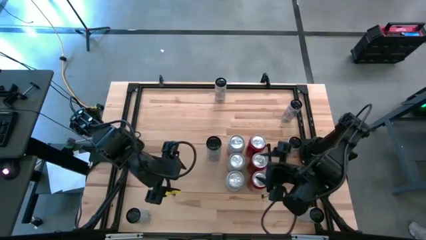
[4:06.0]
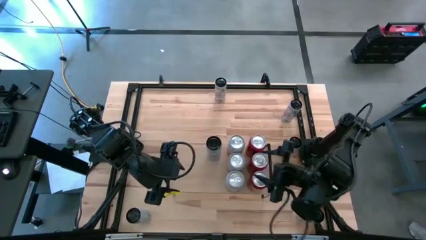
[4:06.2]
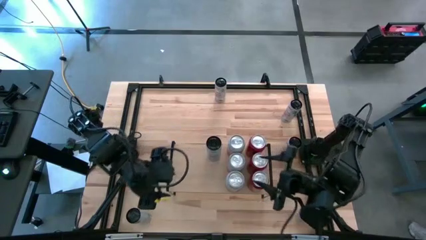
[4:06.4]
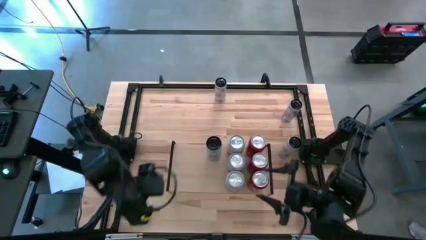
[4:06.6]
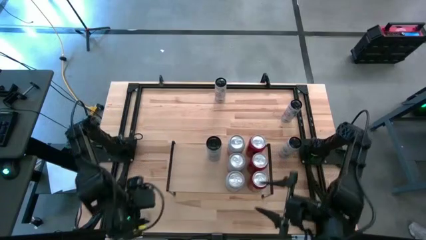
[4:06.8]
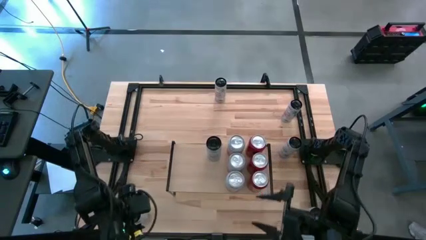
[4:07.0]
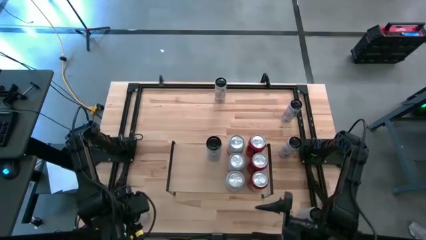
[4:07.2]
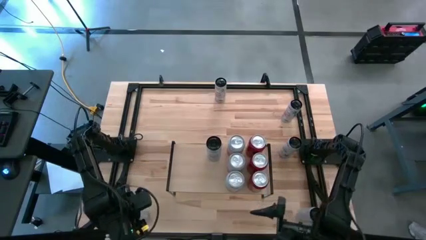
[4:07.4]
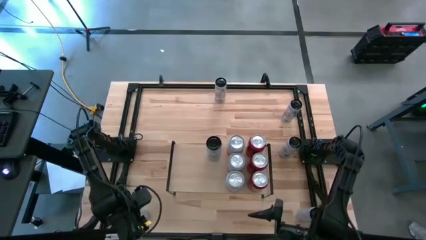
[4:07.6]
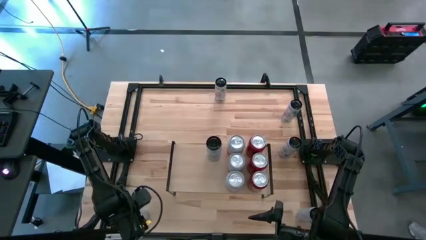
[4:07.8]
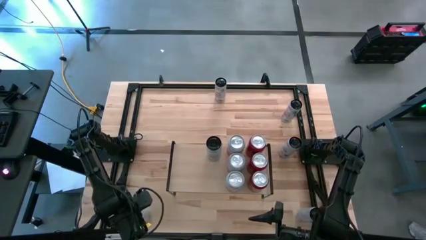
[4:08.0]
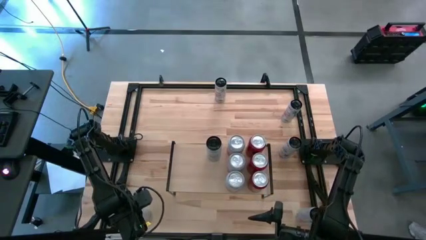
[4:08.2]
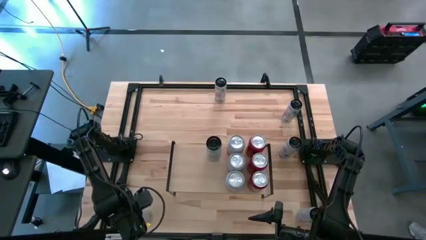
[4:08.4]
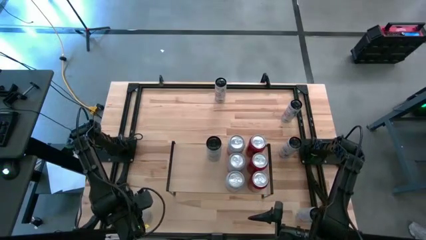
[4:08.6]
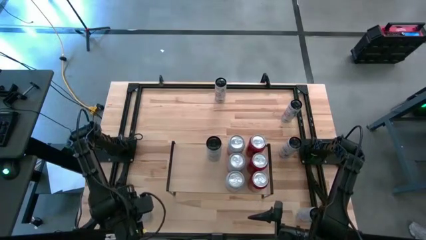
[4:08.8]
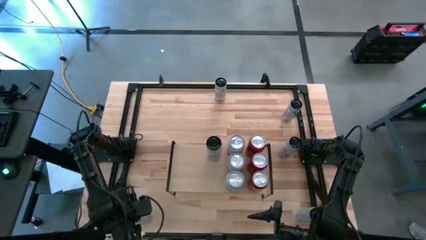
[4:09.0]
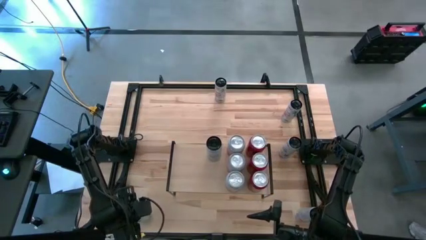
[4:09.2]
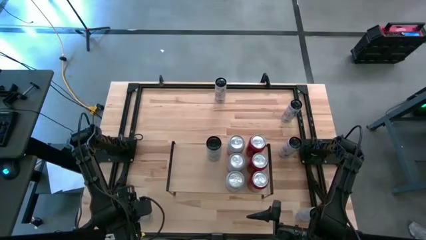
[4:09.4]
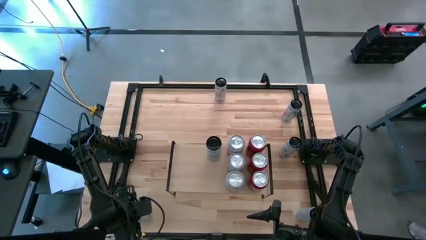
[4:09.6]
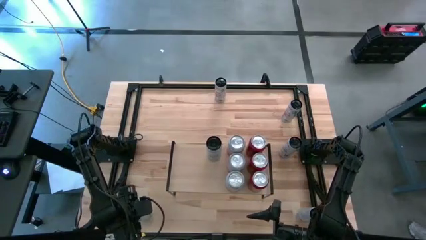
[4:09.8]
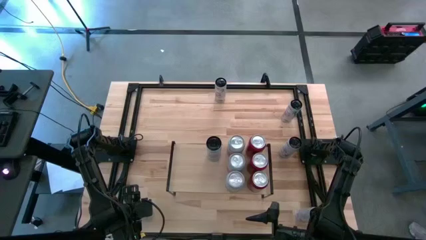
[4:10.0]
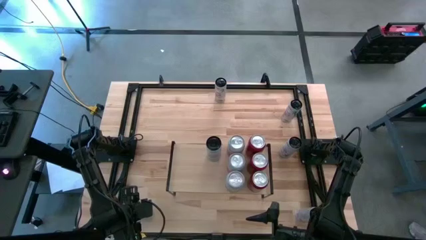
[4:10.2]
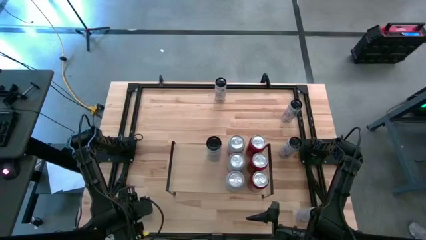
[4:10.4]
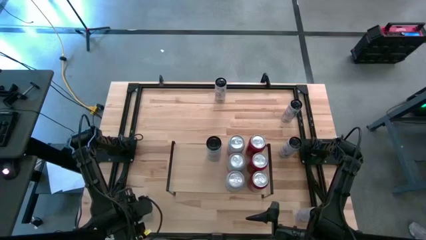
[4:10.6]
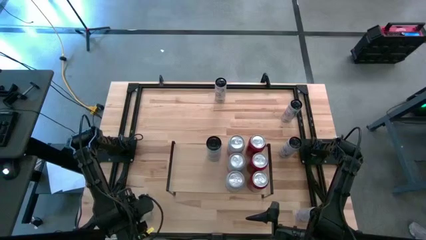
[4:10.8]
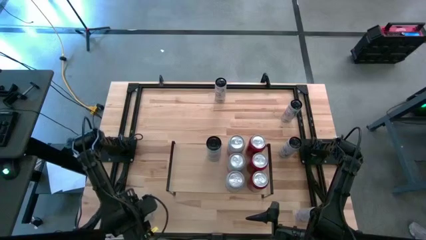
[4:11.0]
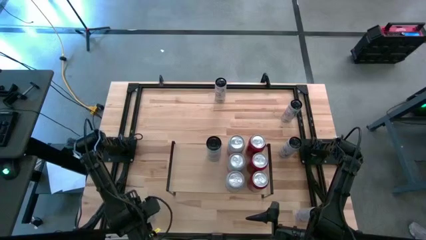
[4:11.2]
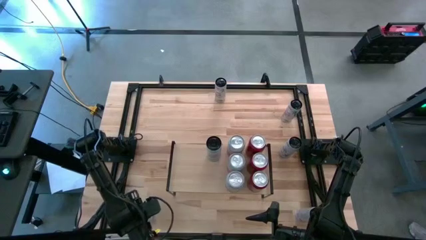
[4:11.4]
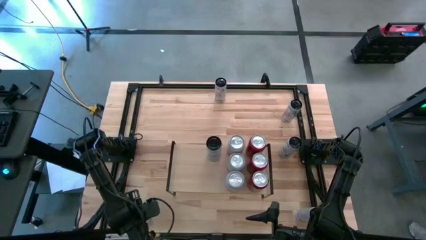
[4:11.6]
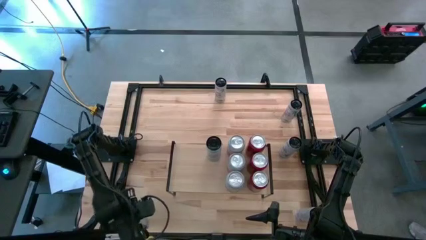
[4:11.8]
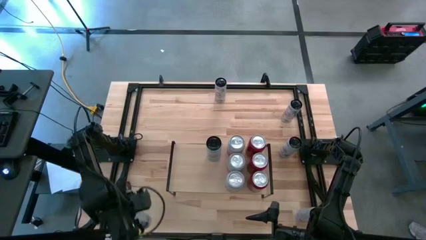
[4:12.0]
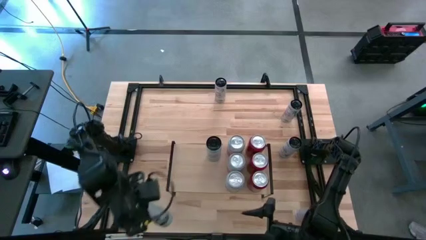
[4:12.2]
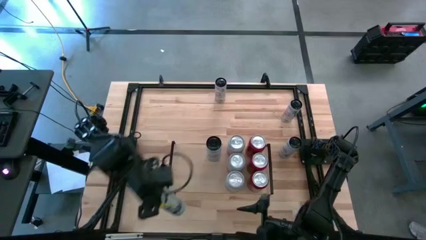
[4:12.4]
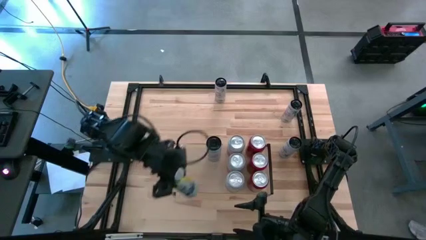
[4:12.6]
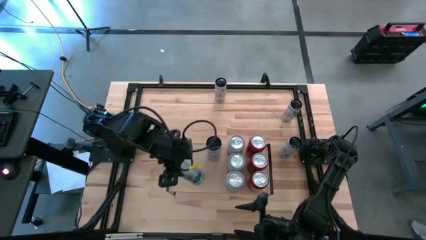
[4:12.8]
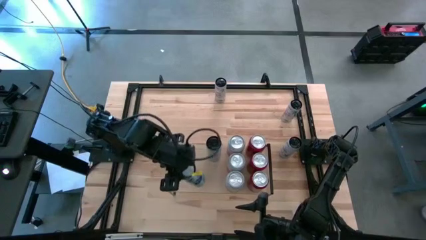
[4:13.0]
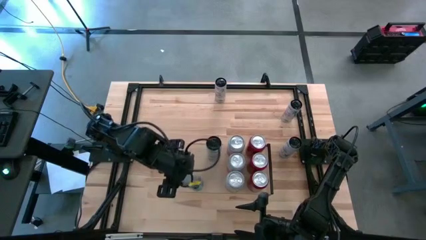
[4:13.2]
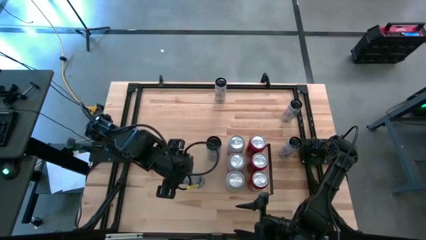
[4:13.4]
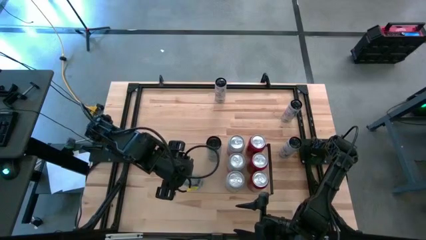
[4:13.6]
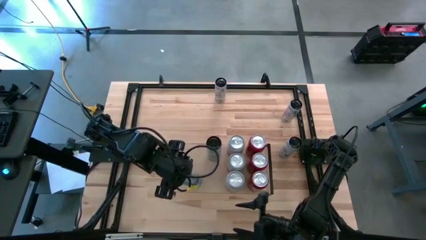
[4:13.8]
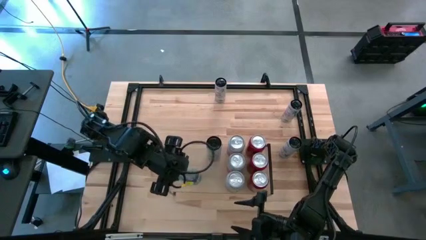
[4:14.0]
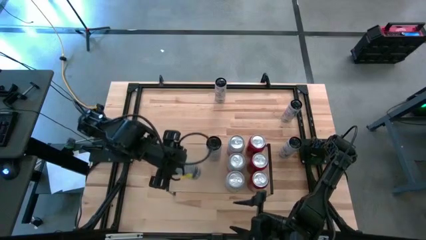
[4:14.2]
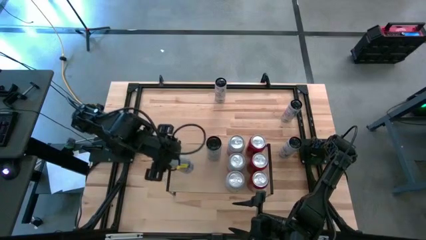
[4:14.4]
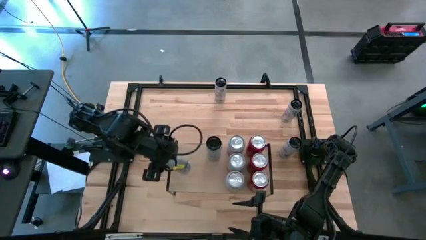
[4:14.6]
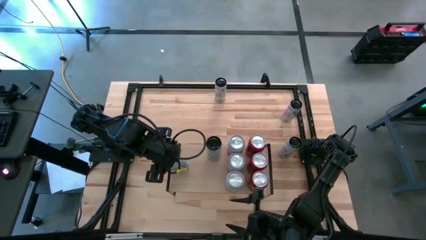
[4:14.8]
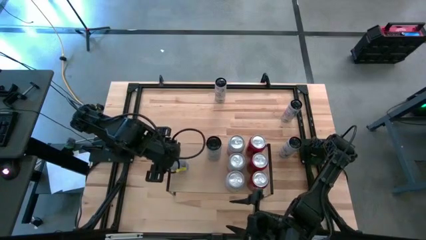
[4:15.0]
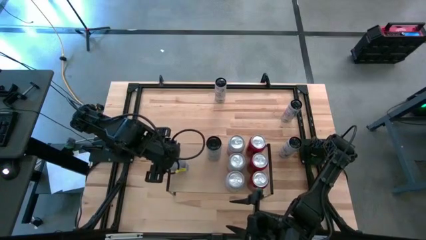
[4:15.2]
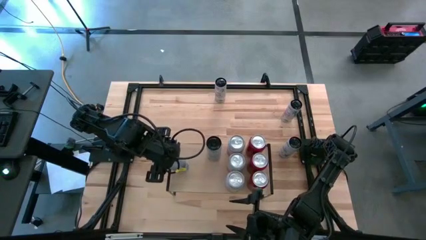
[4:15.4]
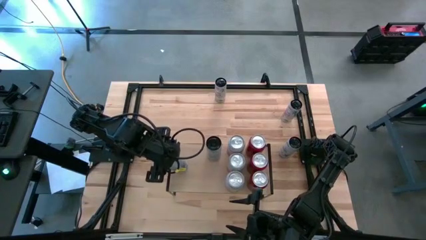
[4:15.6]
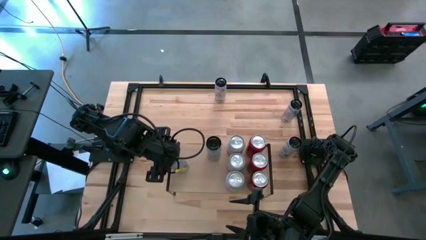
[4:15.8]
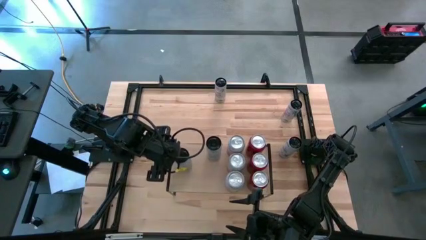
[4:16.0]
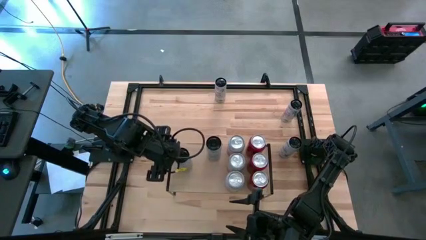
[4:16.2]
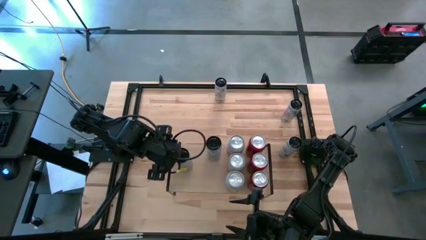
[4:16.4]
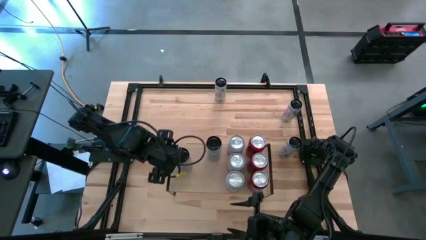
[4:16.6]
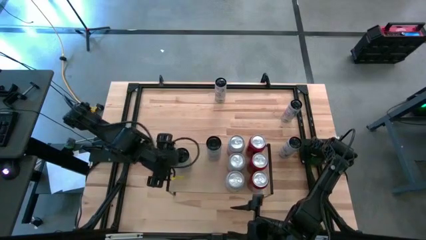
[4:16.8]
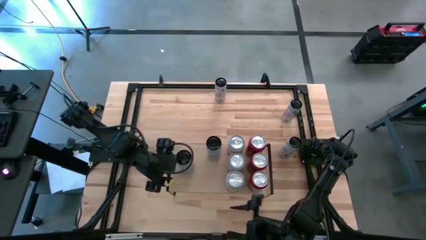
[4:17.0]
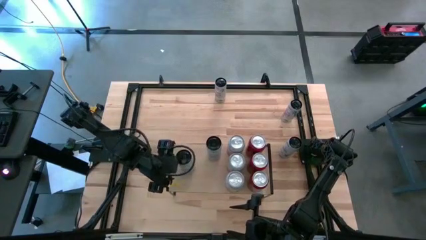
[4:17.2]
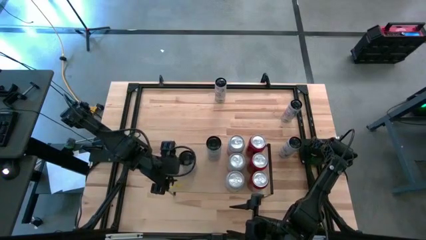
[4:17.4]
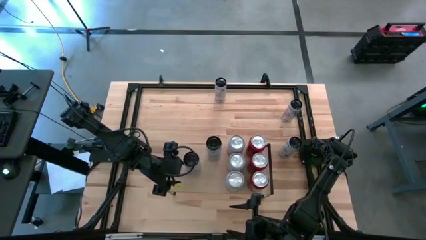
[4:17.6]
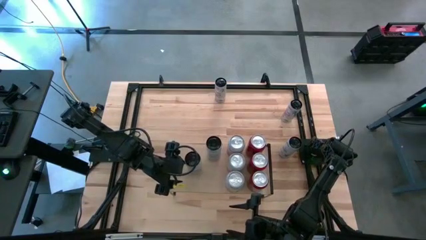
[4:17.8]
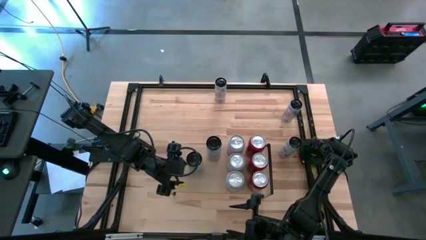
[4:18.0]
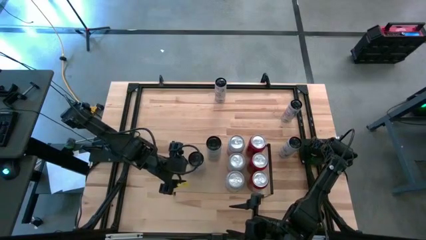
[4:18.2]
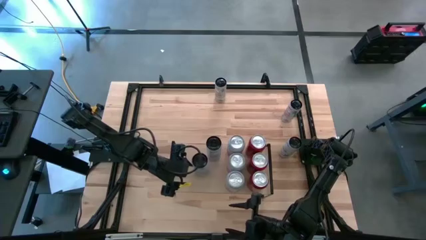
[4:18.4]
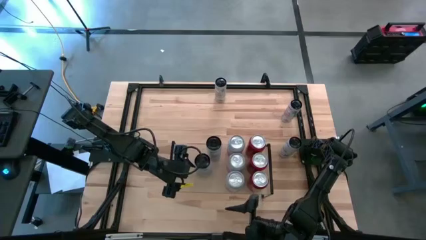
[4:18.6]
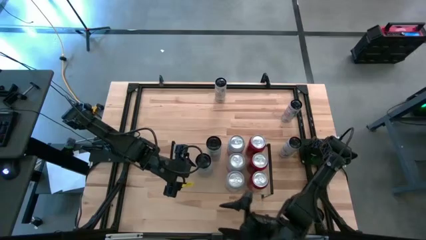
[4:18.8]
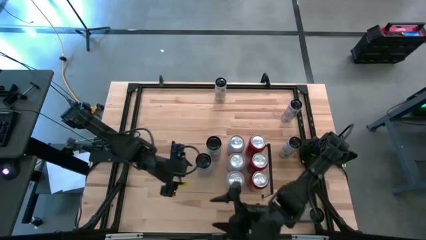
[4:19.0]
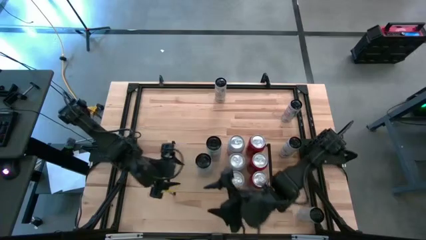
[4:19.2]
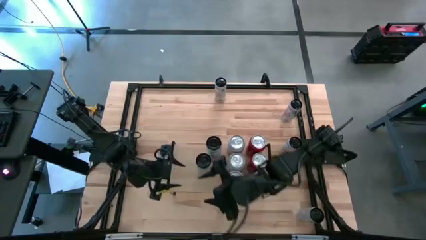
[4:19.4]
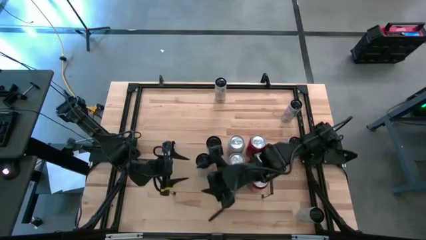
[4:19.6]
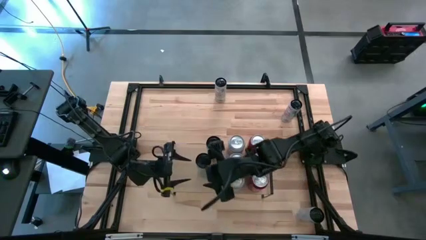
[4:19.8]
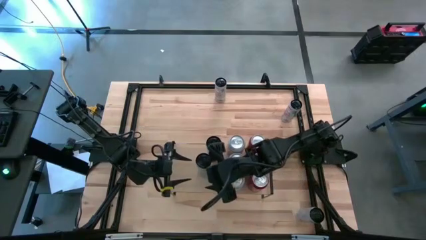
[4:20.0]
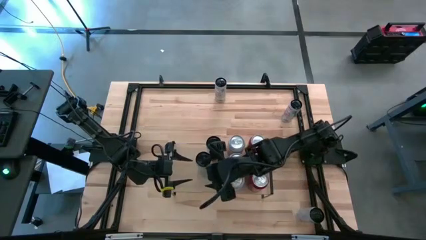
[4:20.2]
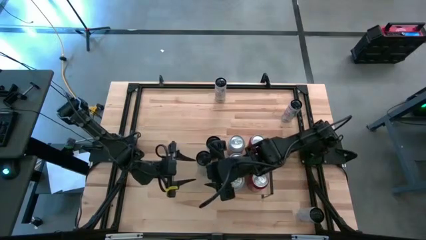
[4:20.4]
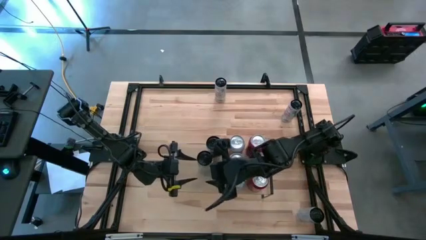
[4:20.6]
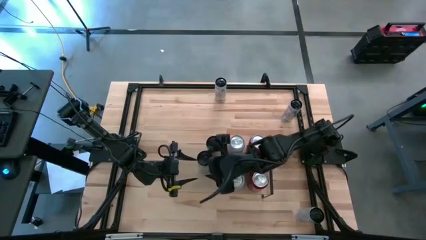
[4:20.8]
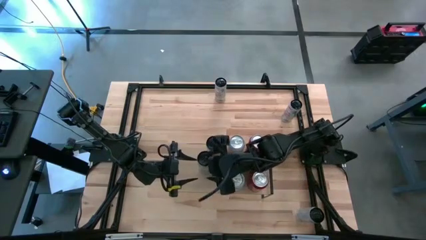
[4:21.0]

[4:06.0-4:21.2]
Task: Place canned beverage on shelf
Put the bottom white-blue soda can on the shelf aligned with the other white-blue soda cans
